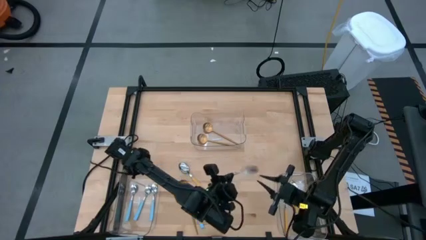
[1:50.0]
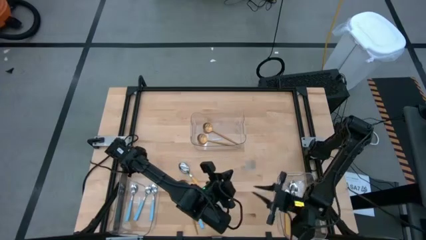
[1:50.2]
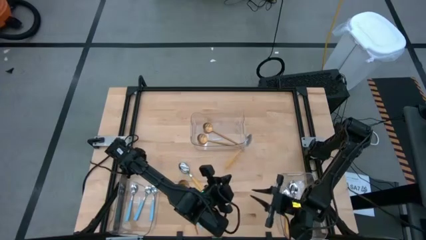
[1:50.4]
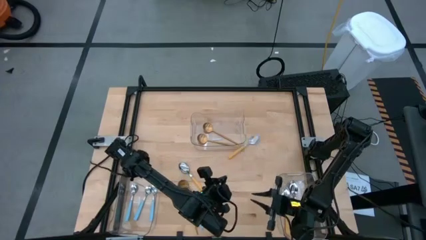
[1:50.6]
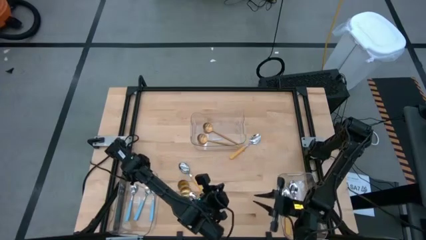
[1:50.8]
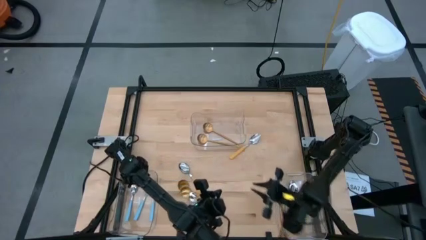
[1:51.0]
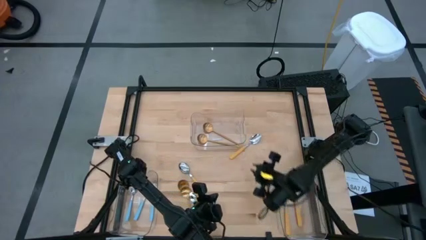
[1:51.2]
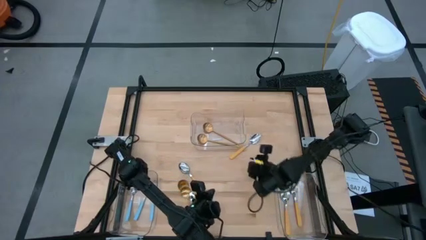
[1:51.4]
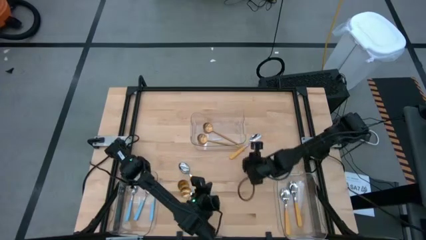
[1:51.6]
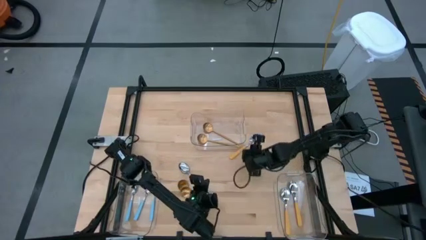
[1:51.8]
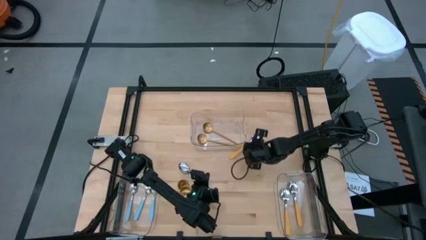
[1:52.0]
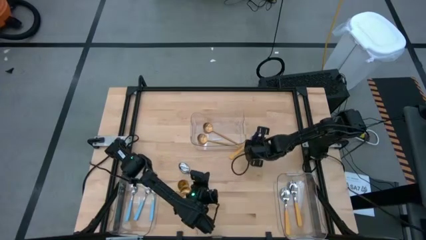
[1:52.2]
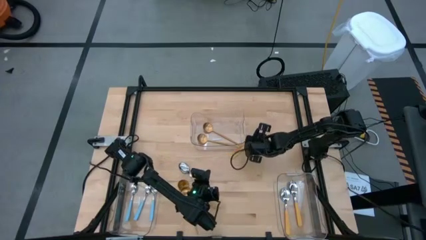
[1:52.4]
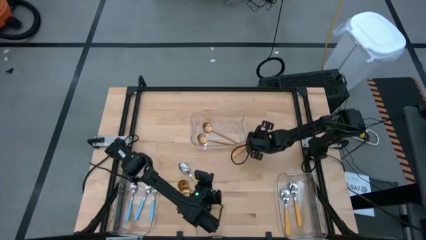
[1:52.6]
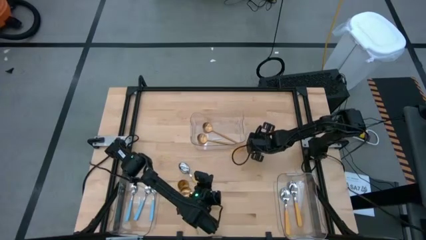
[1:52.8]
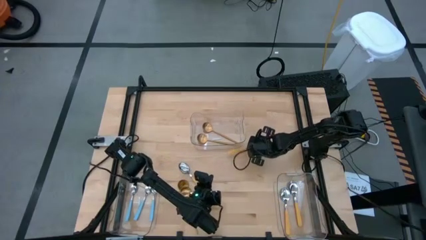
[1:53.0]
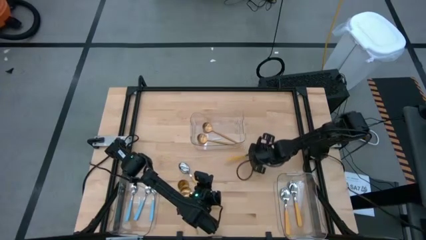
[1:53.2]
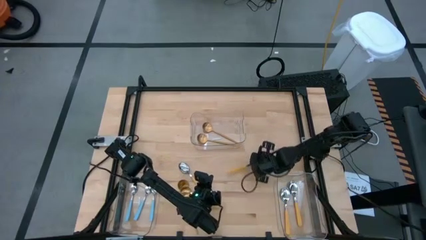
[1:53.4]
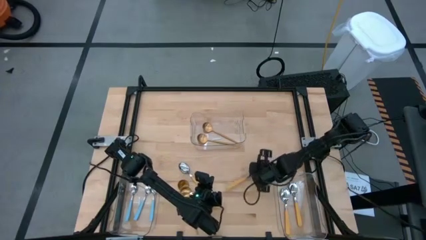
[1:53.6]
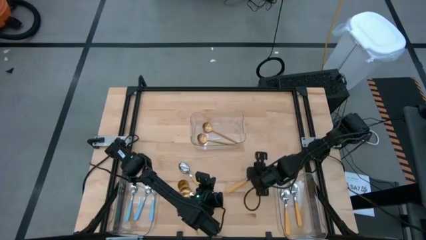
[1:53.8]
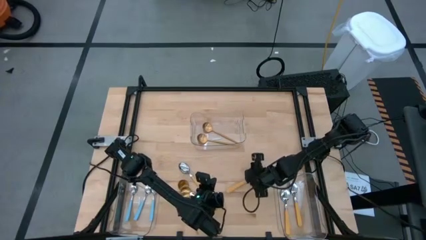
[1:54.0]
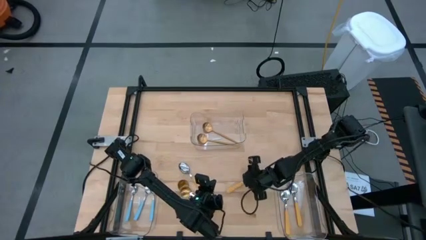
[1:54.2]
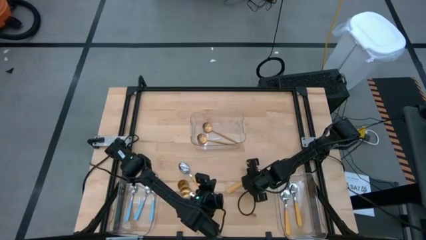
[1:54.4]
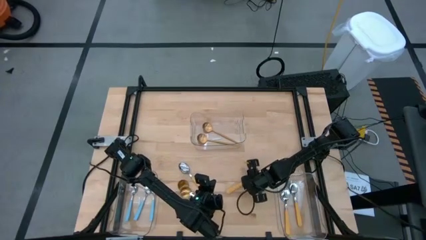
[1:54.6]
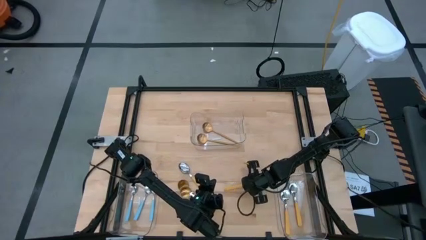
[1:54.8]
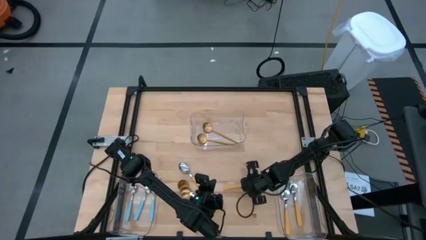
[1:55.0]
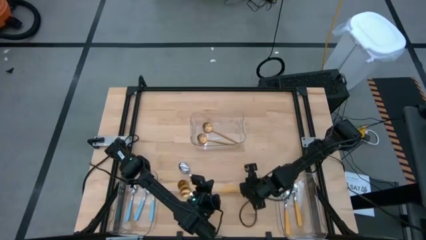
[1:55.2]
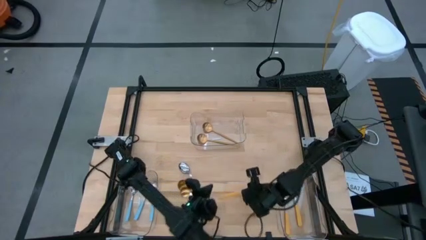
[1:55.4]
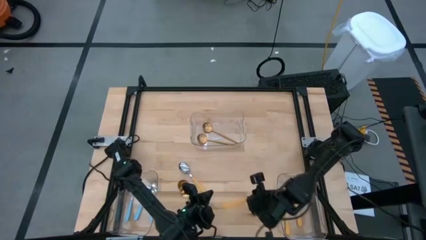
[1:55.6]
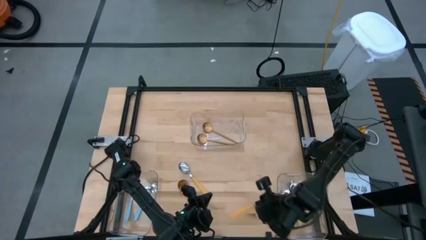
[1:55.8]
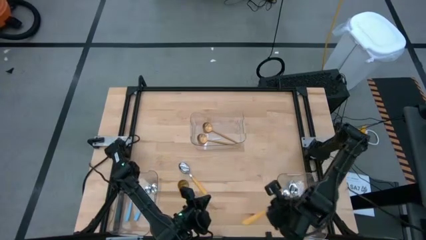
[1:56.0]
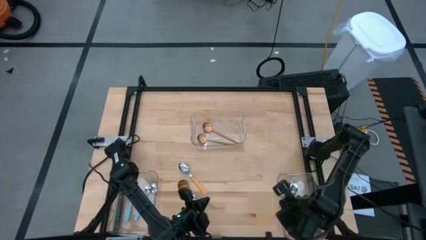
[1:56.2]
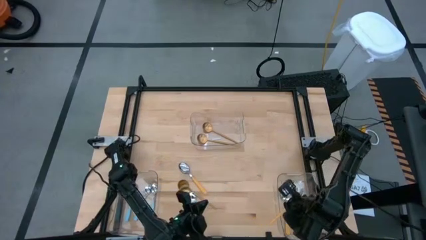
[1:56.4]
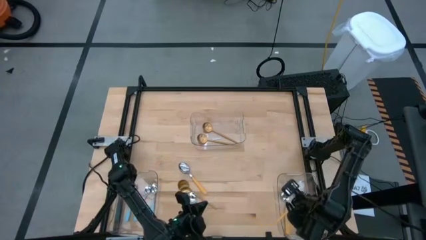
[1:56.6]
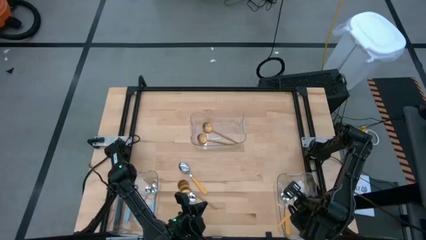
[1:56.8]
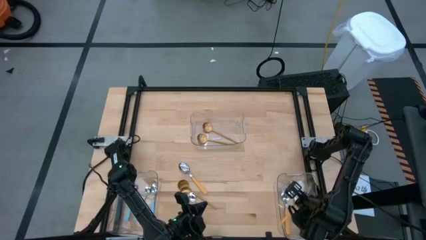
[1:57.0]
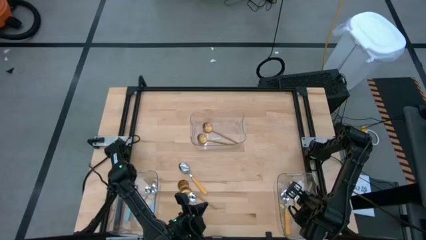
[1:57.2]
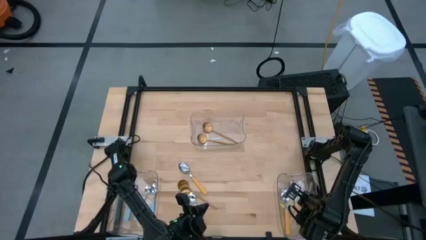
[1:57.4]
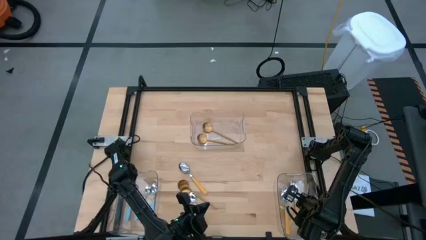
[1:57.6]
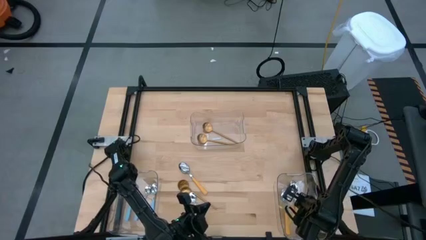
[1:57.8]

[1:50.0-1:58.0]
Task: Sort silverware by color (type)
Put the yellow spoon into the bottom right transparent bin

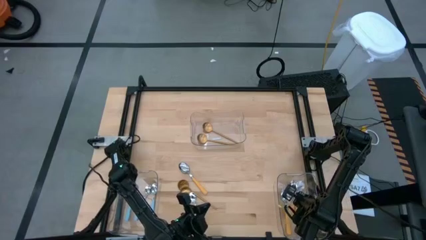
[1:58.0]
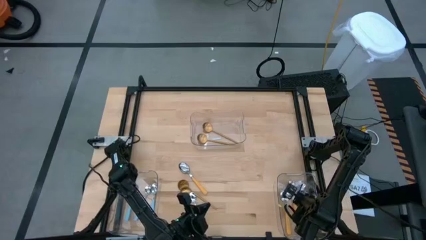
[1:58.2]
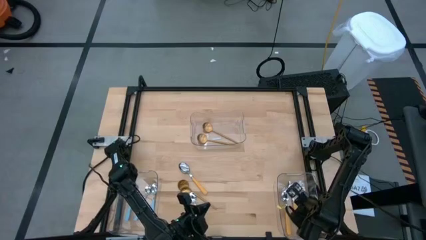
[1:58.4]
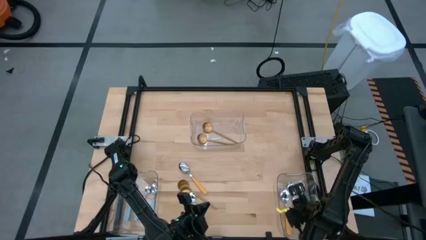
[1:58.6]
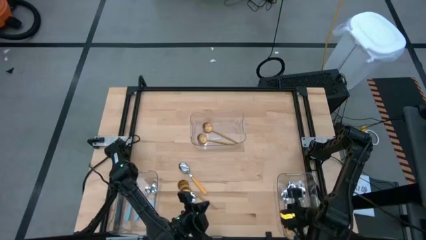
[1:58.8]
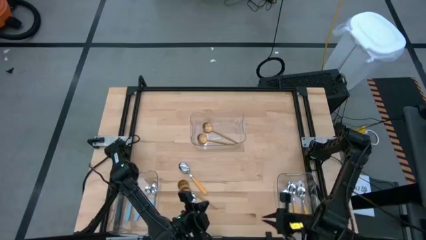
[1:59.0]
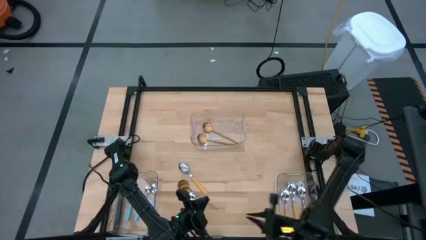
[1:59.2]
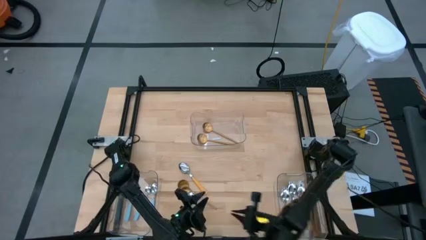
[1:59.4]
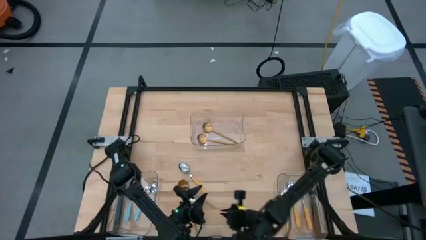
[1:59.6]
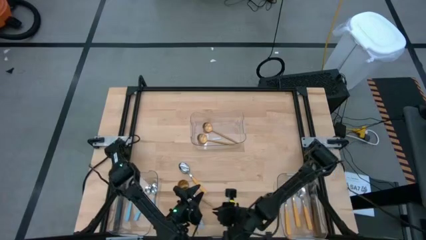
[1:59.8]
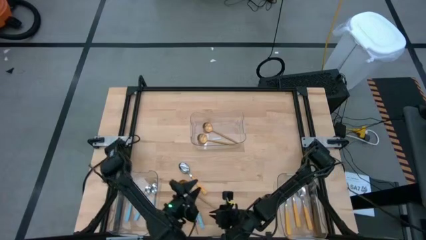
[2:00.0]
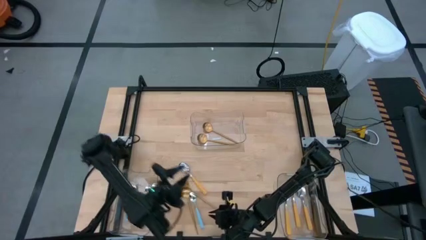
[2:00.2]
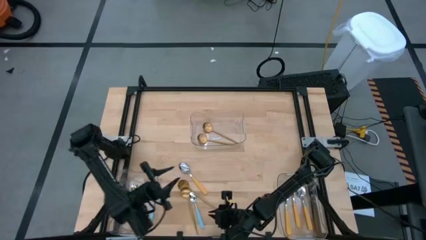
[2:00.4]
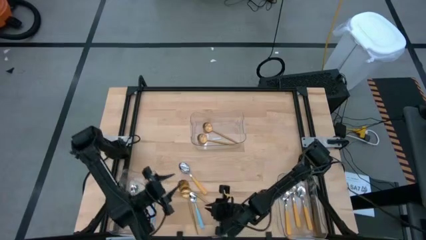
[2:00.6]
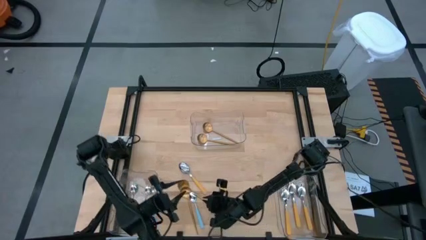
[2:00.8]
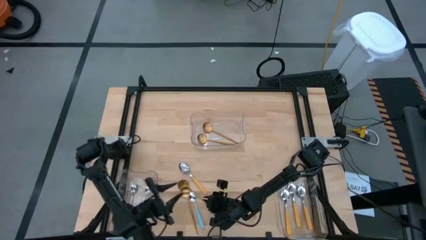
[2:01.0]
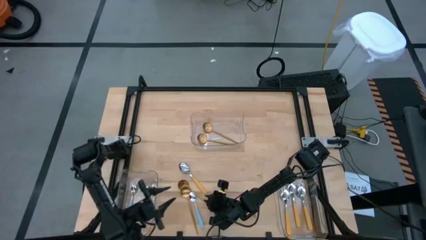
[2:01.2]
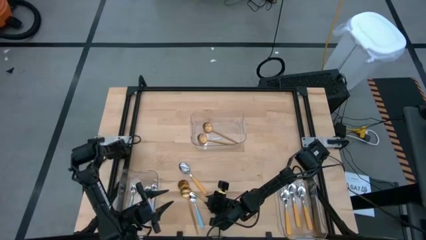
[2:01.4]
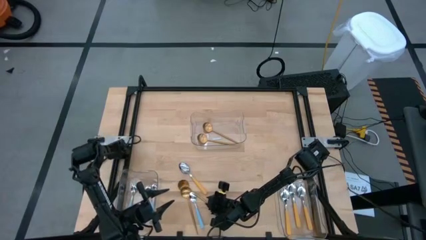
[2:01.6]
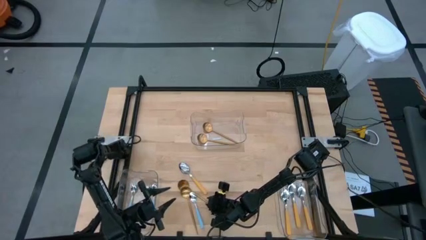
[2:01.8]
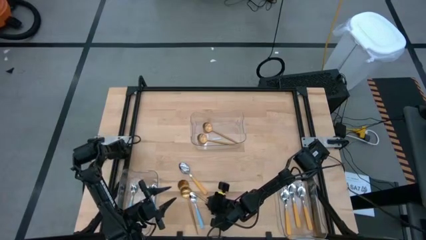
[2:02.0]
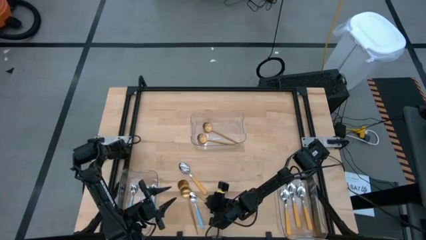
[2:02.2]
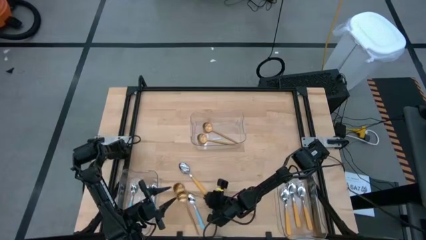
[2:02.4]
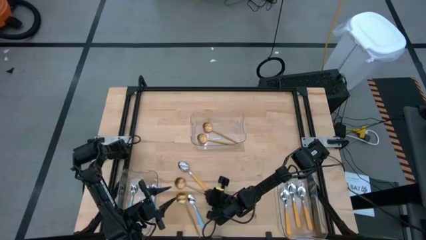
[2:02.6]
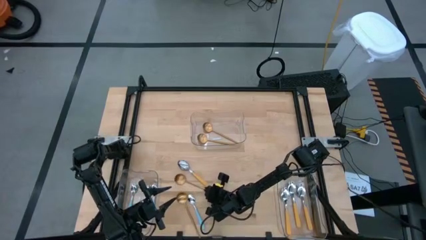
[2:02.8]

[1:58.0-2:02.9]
Put the gold spoon into the top transparent bin

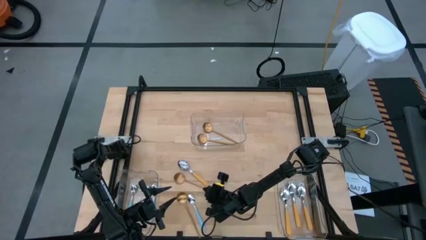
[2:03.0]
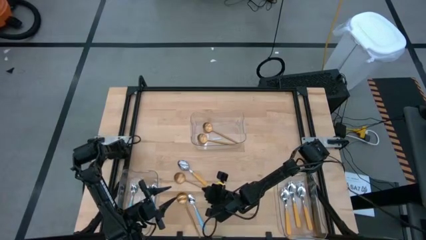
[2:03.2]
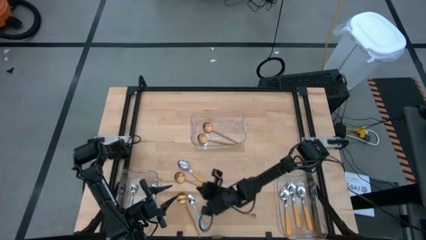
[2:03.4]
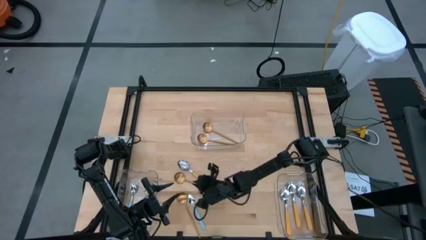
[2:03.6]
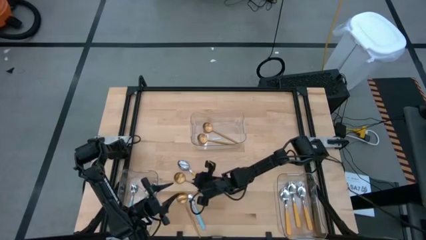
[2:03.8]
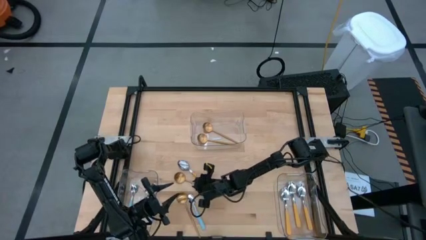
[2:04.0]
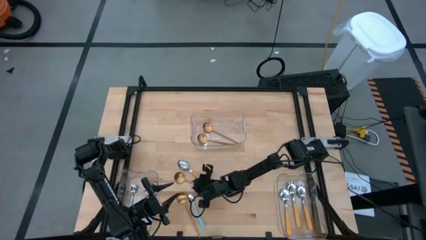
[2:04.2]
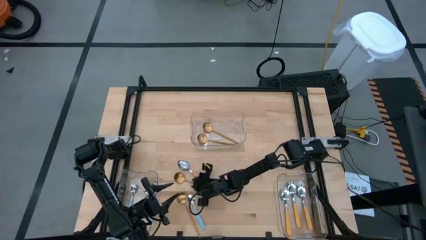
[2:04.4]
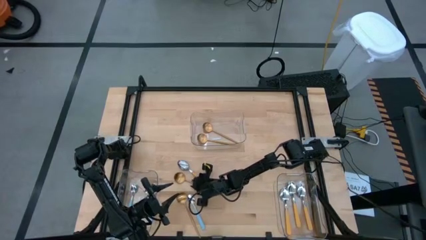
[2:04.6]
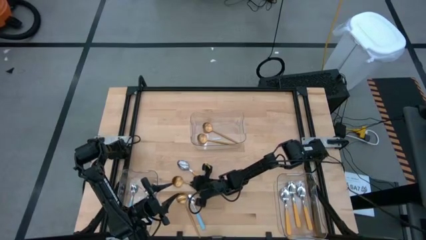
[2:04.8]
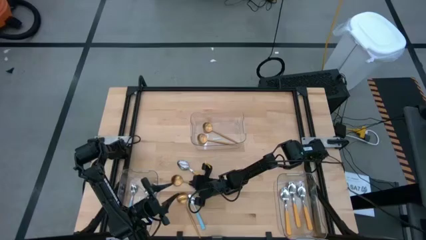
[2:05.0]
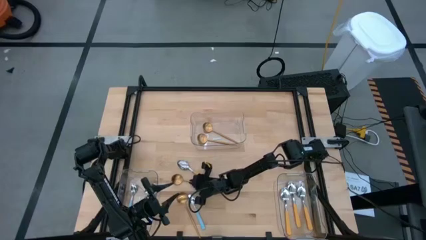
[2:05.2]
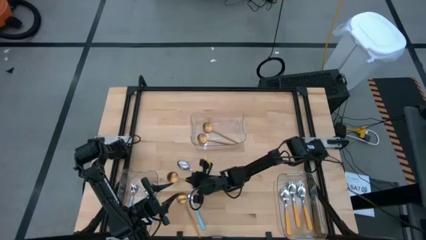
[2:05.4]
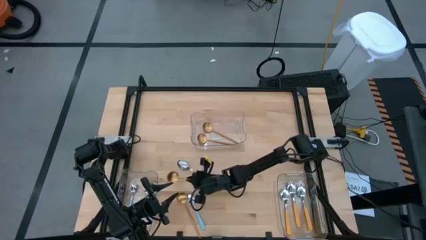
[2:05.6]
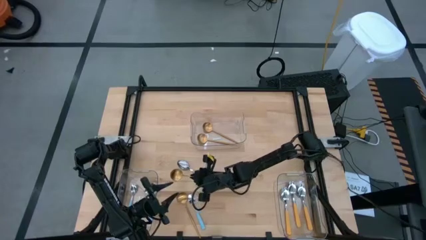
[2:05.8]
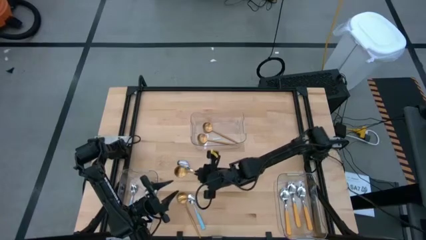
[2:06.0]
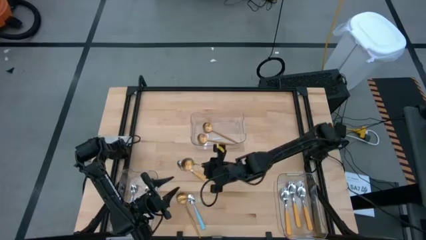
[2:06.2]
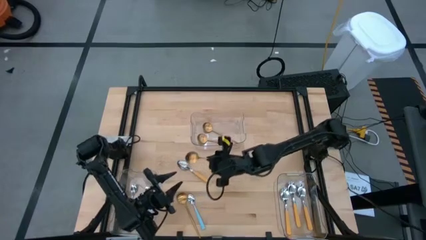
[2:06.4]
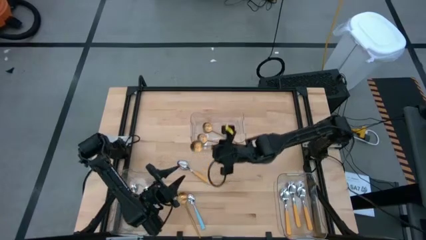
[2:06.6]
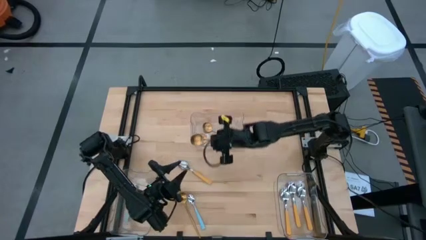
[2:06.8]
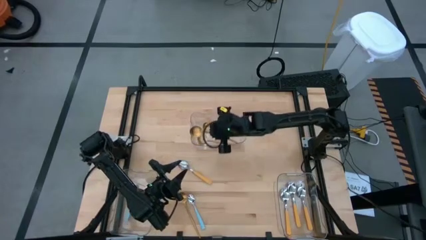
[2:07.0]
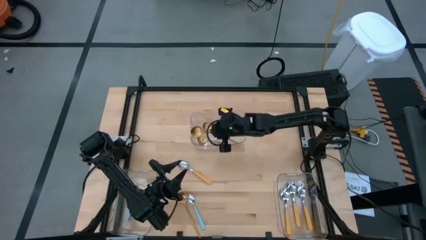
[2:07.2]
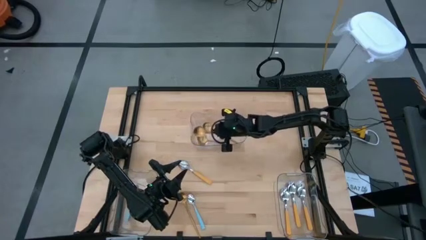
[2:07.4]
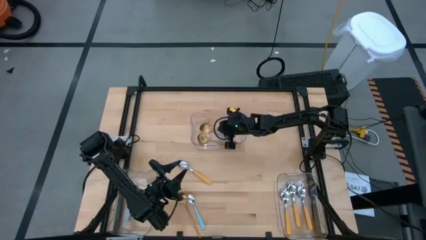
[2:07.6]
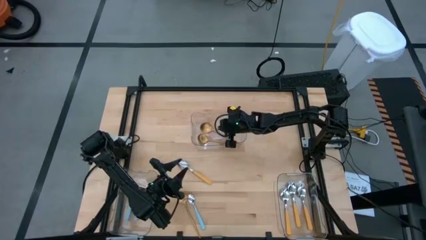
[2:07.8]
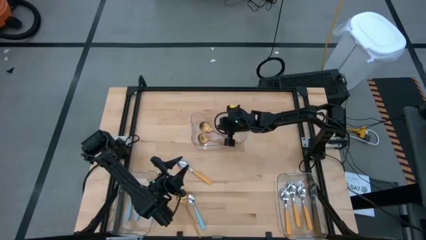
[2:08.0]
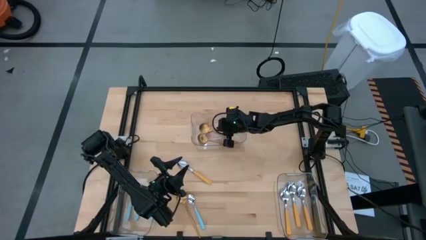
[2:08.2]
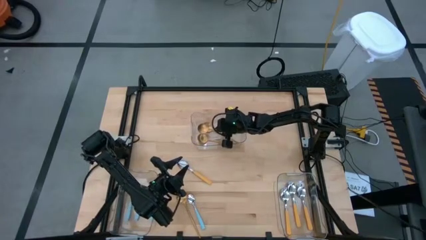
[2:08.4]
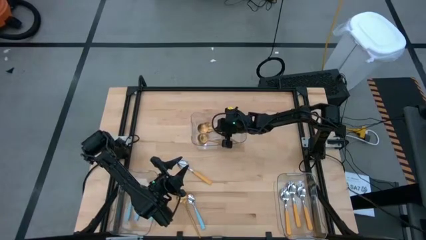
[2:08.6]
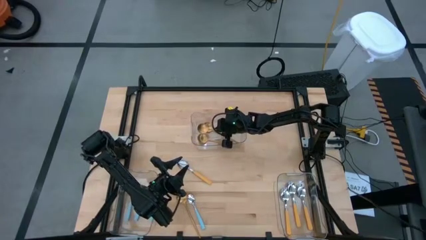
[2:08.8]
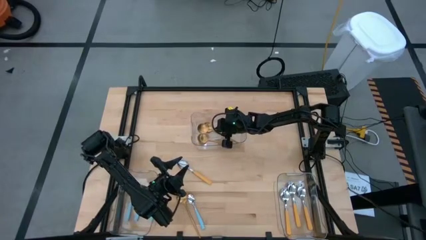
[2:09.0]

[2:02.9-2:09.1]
Put the gold spoon into the top transparent bin
